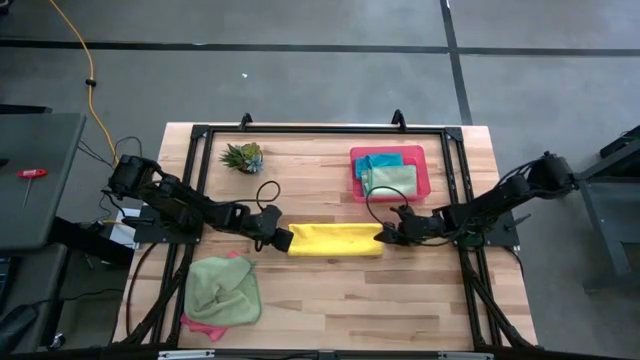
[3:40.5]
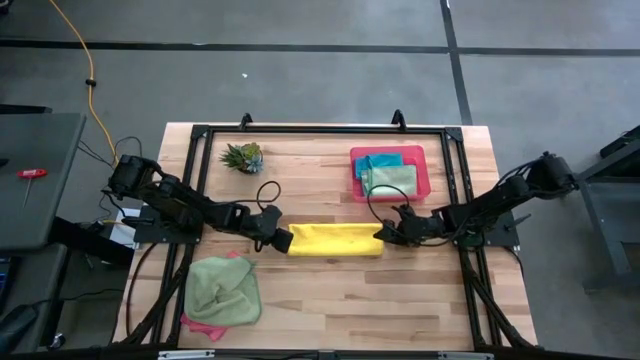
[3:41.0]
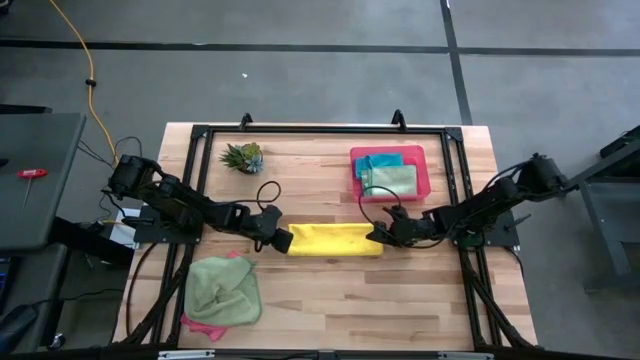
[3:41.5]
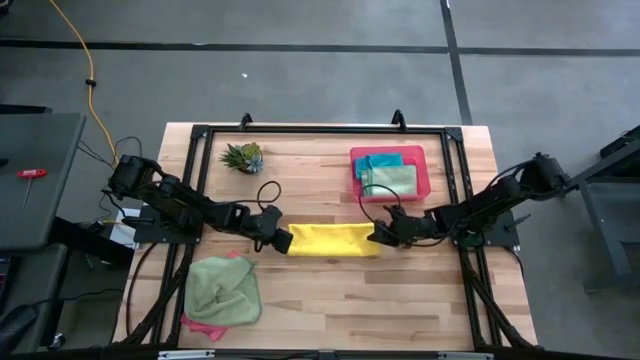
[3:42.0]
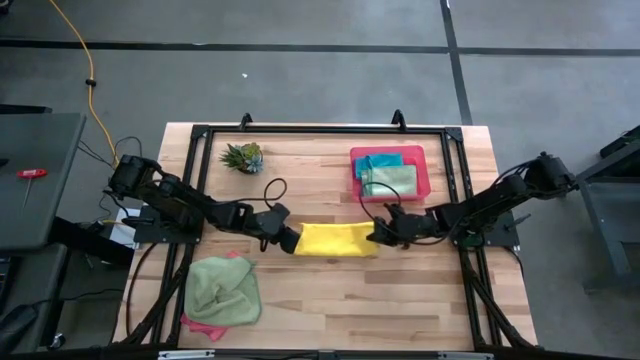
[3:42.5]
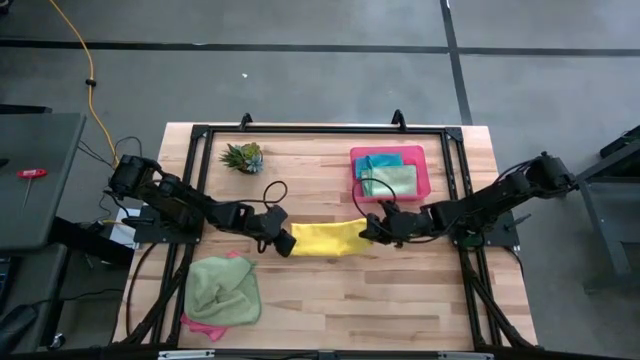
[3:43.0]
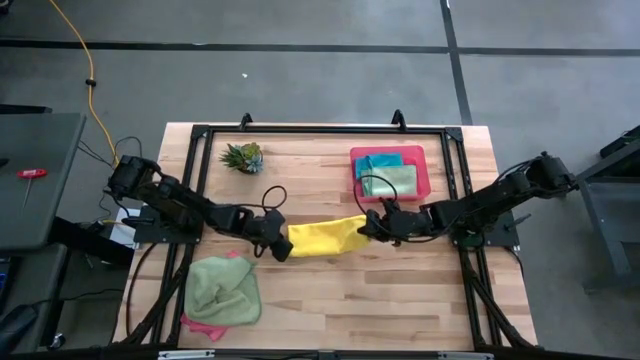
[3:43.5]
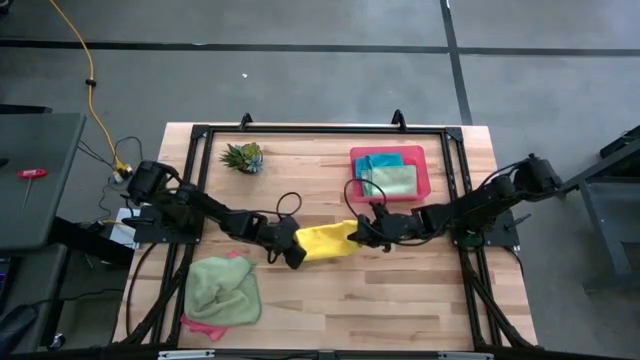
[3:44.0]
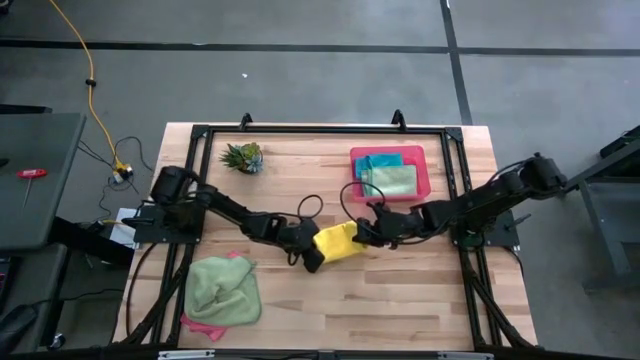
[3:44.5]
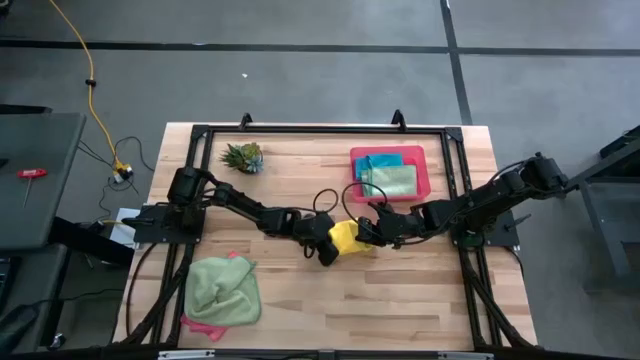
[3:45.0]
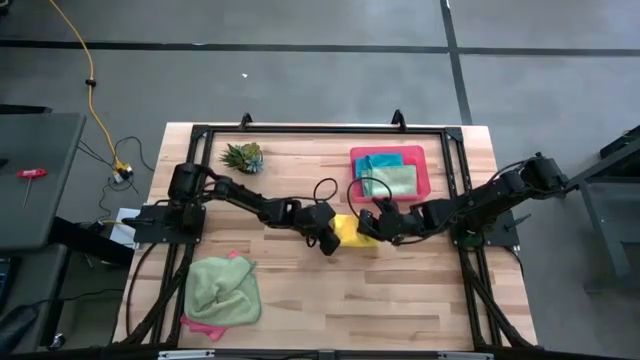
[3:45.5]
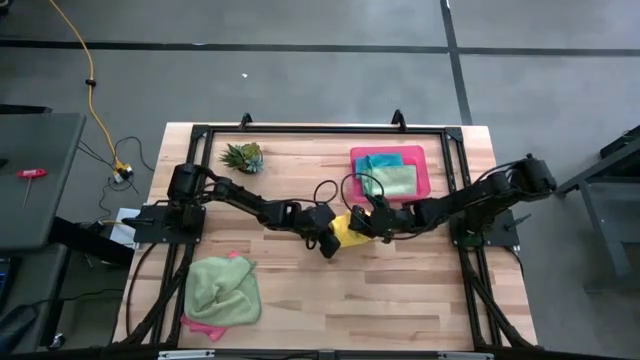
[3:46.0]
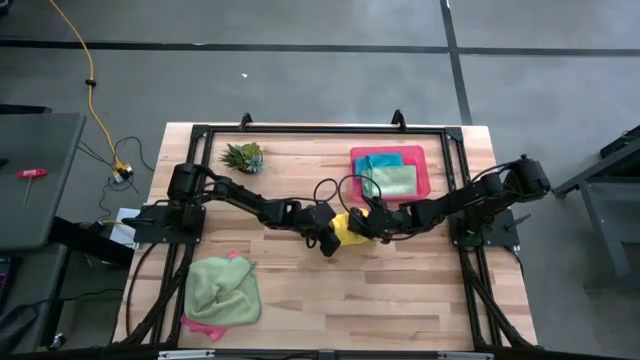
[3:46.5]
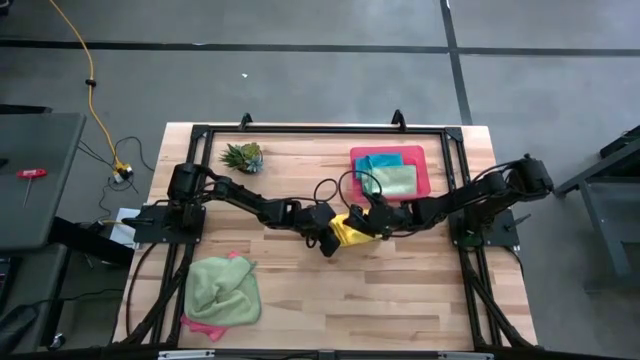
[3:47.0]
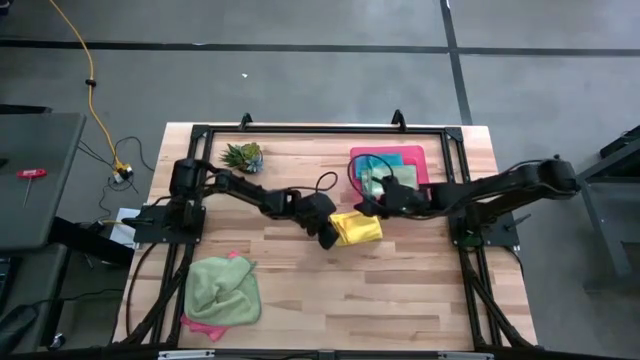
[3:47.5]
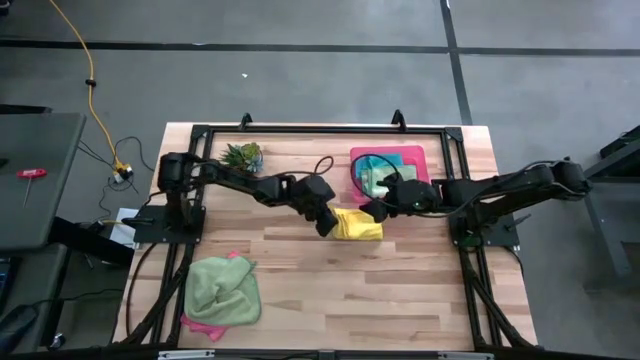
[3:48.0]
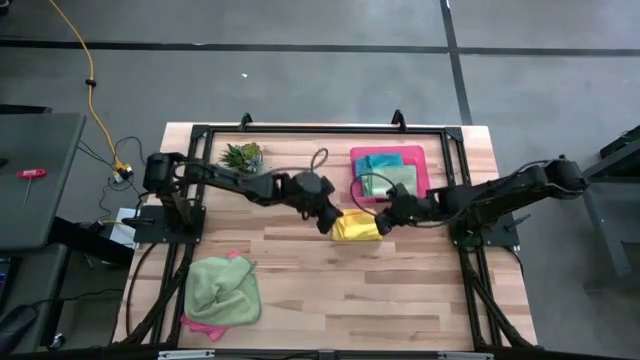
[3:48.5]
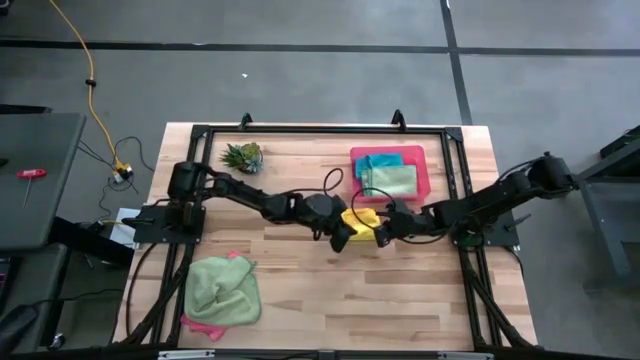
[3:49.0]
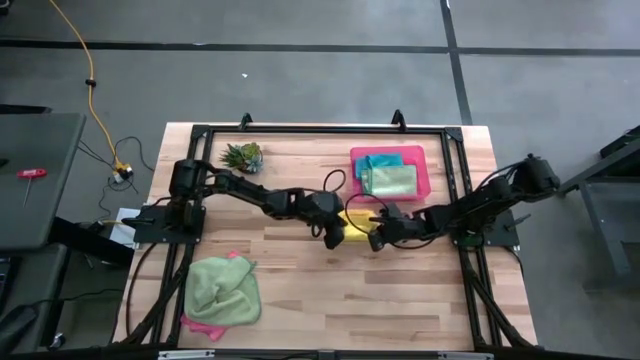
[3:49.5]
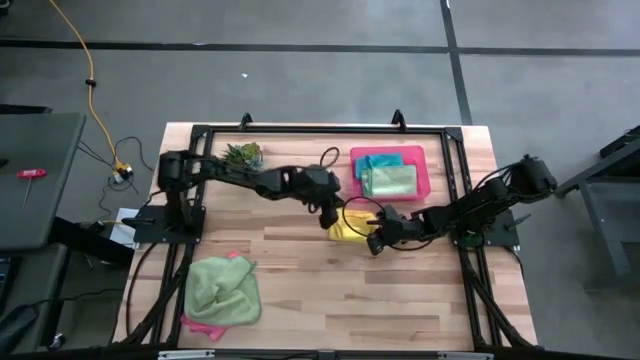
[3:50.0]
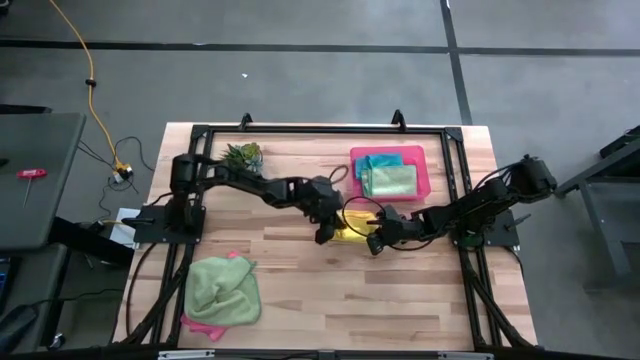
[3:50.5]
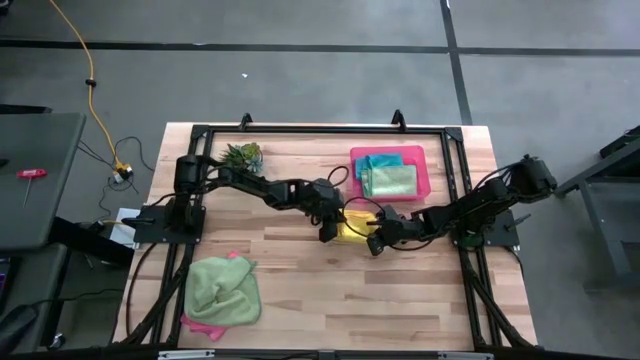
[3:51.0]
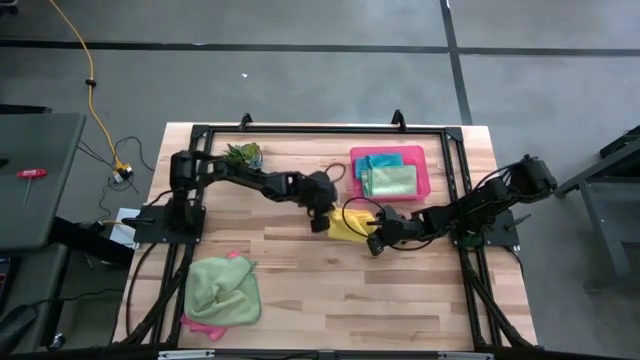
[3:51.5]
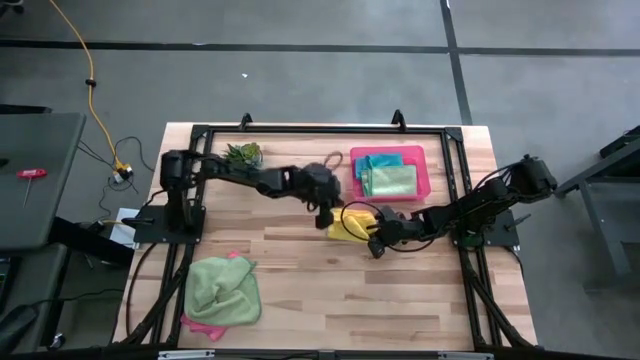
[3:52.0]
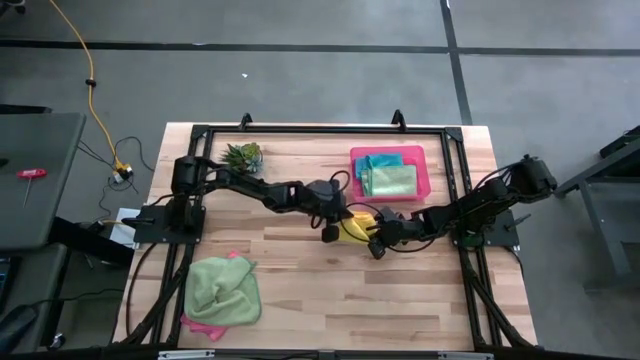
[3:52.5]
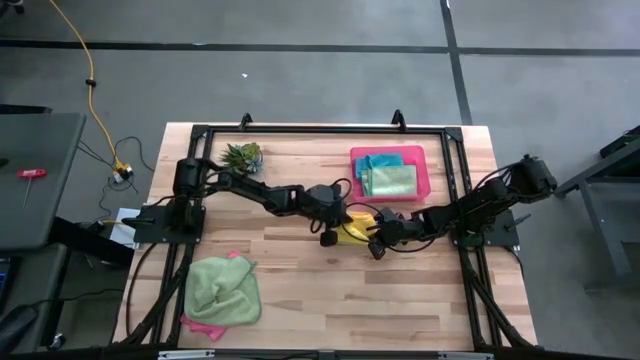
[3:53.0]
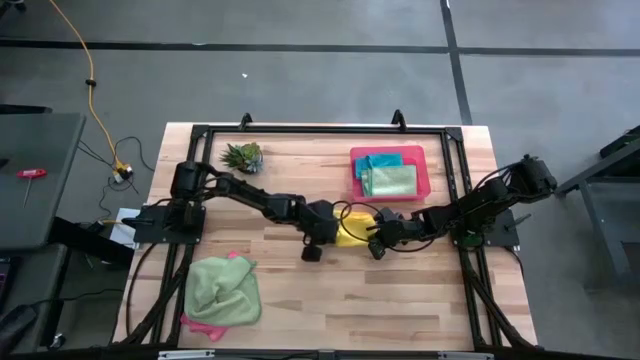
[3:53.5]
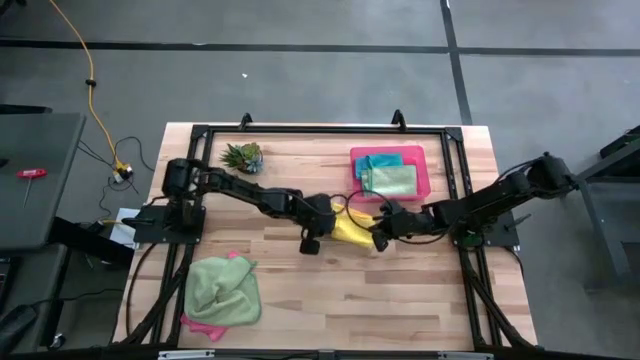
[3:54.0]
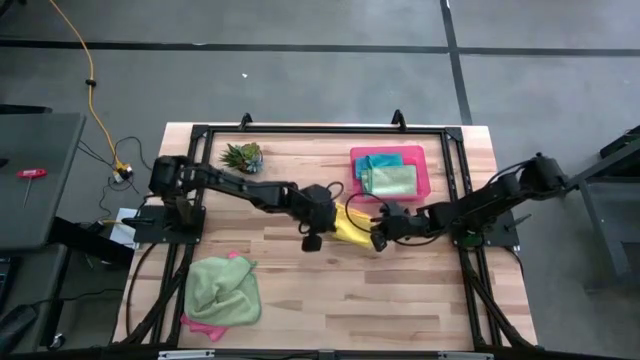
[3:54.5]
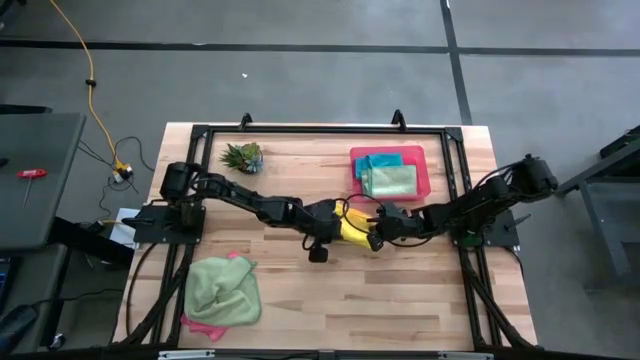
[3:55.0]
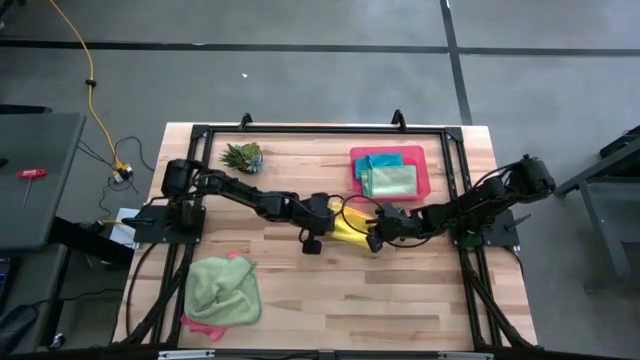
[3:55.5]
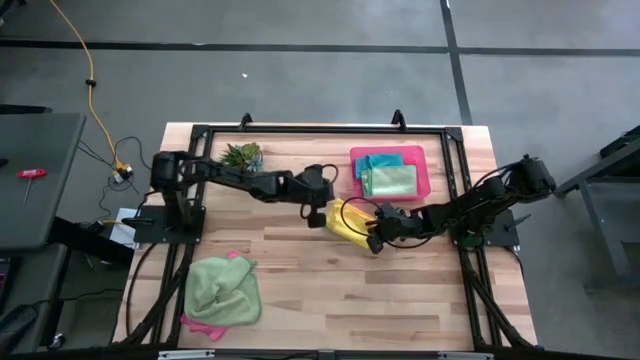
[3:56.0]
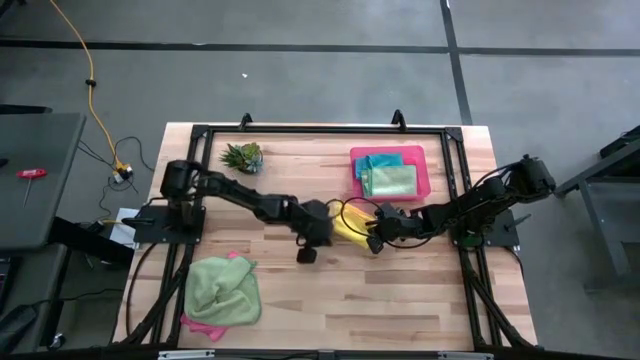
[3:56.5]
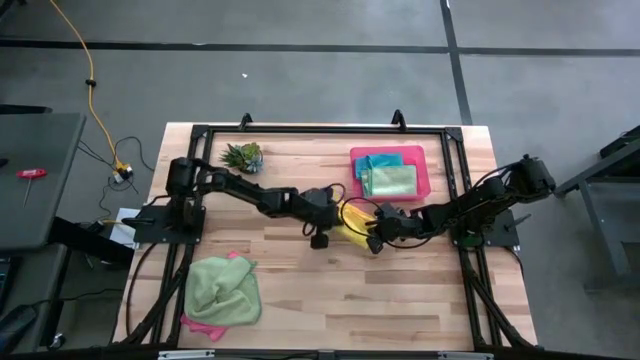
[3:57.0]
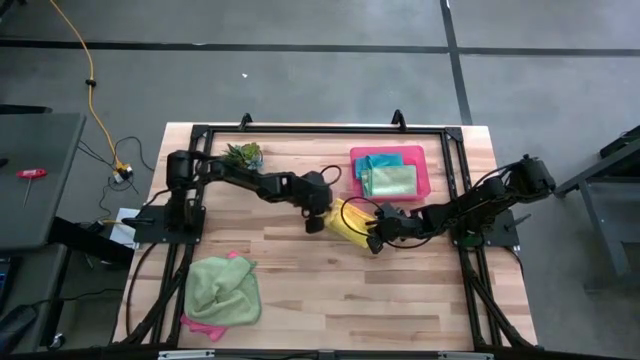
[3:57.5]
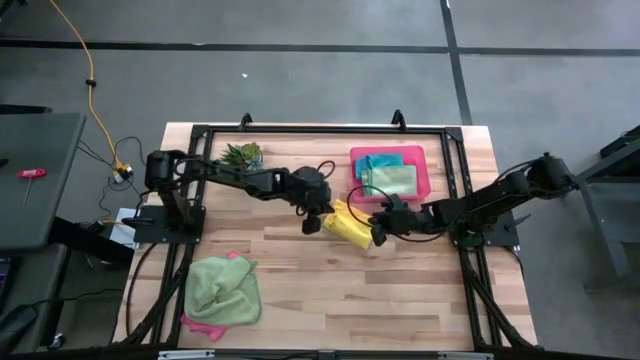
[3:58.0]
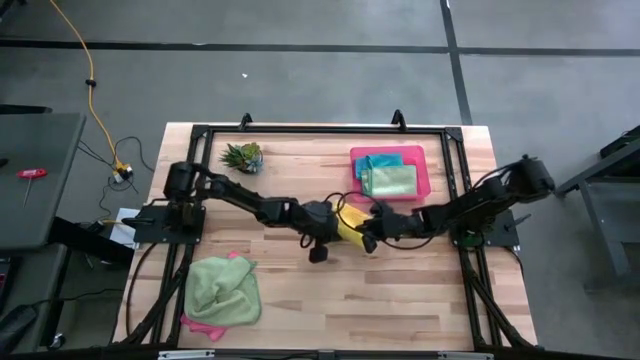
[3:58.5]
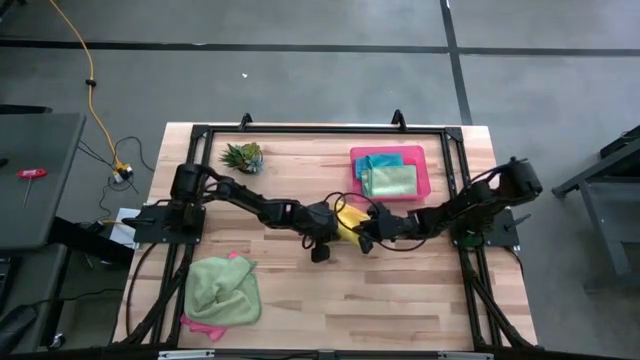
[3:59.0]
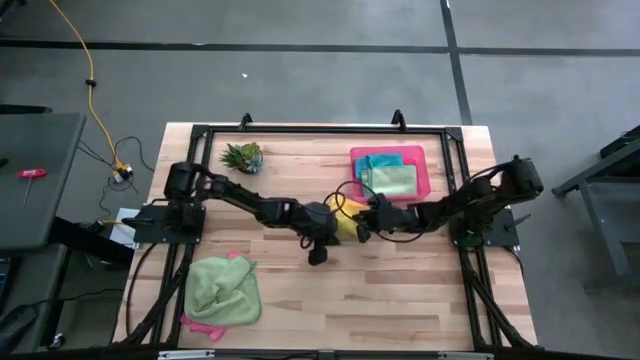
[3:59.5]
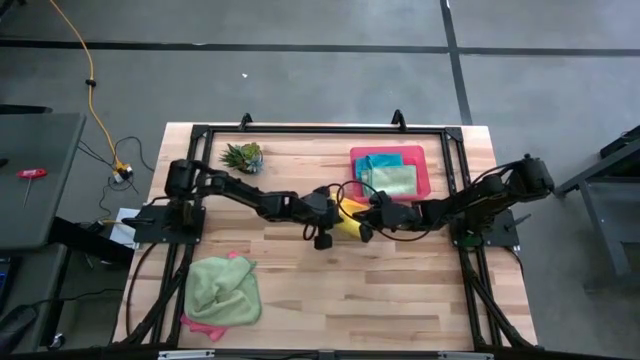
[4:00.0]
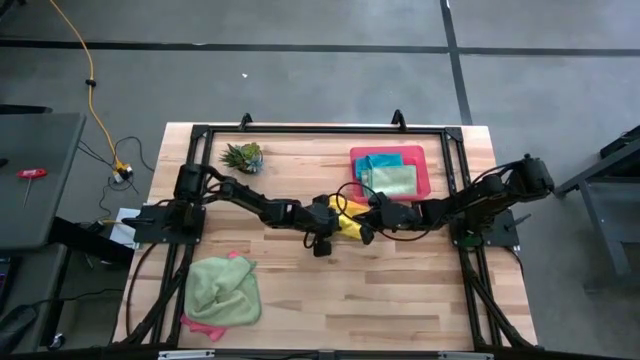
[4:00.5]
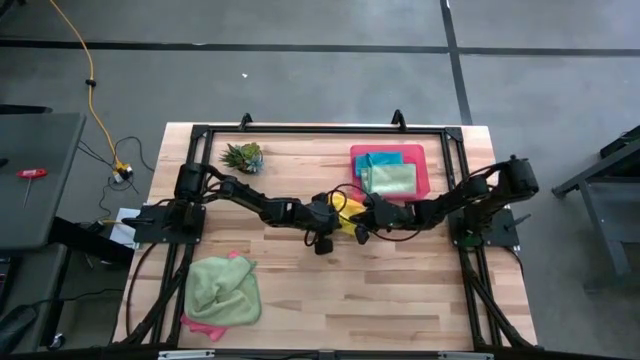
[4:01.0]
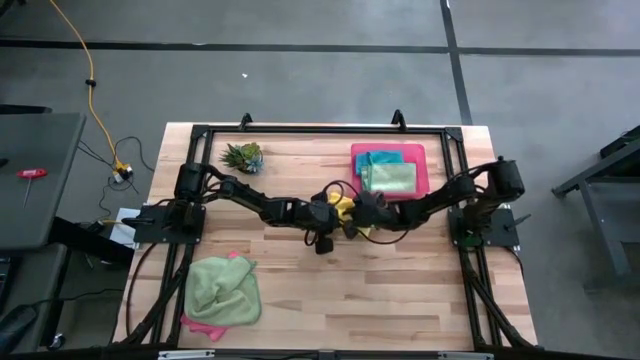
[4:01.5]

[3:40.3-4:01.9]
Task: Fold microfiber towels
Fold the yellow microfiber cloth
